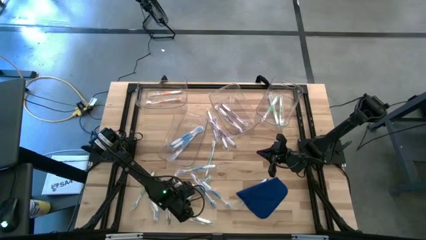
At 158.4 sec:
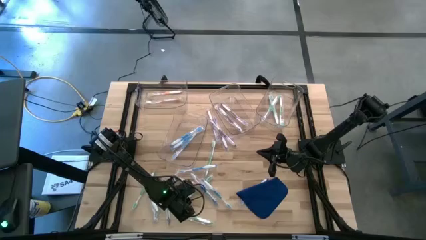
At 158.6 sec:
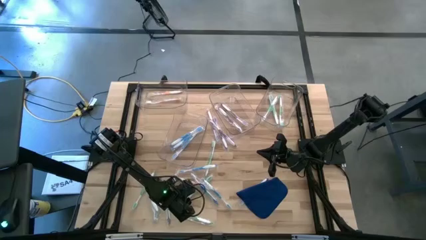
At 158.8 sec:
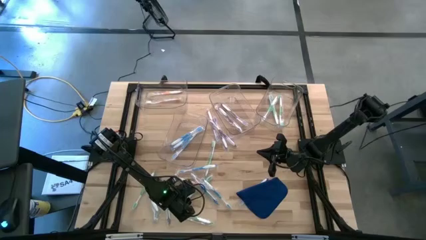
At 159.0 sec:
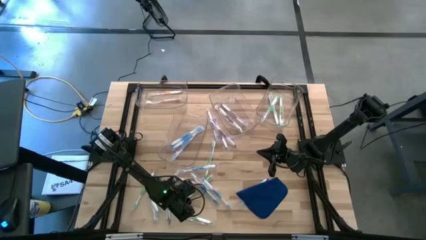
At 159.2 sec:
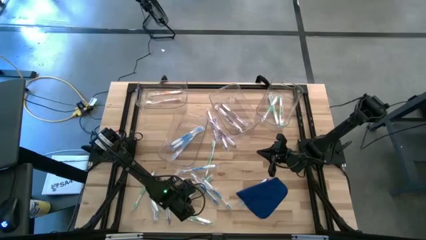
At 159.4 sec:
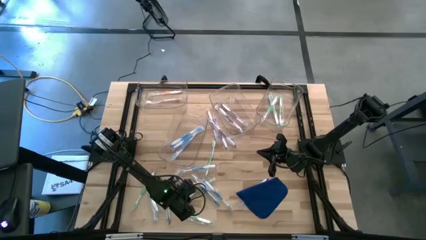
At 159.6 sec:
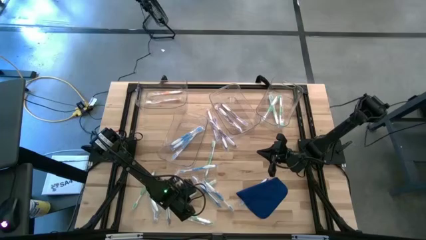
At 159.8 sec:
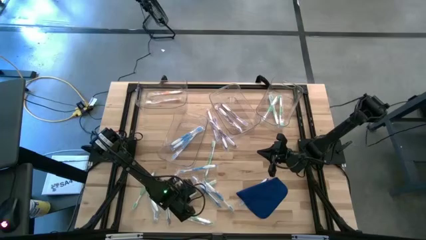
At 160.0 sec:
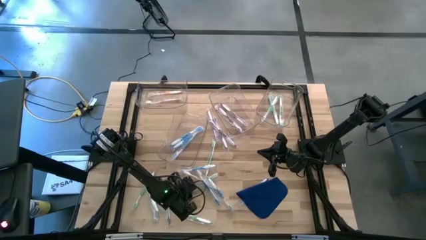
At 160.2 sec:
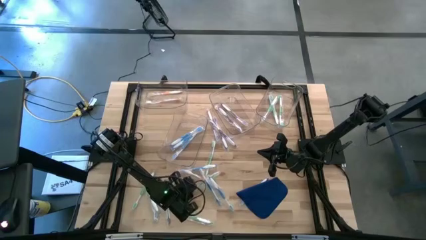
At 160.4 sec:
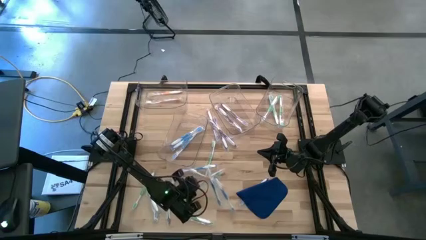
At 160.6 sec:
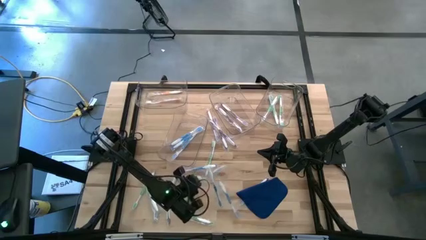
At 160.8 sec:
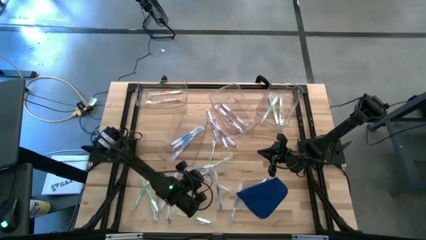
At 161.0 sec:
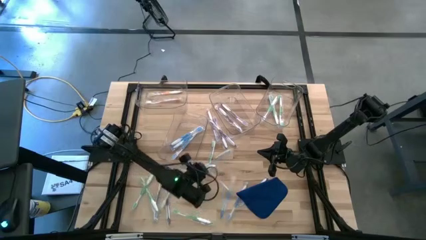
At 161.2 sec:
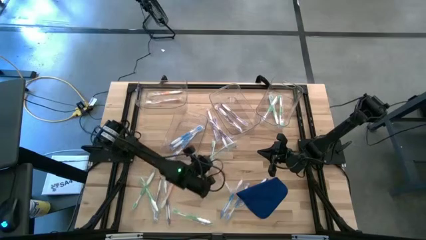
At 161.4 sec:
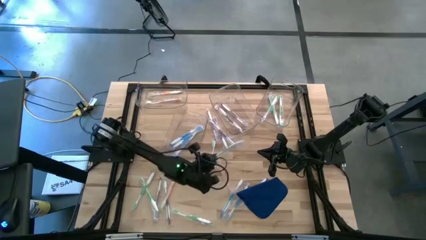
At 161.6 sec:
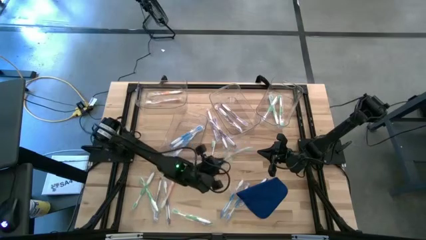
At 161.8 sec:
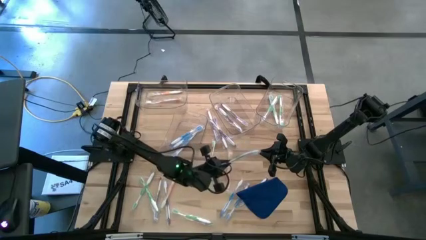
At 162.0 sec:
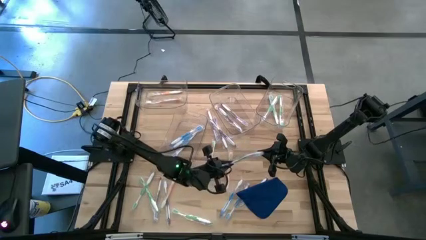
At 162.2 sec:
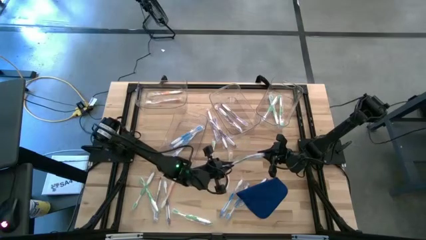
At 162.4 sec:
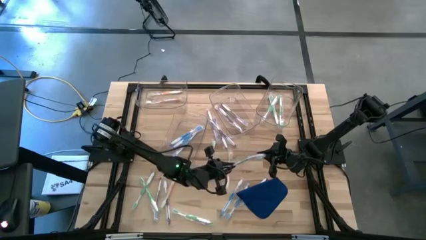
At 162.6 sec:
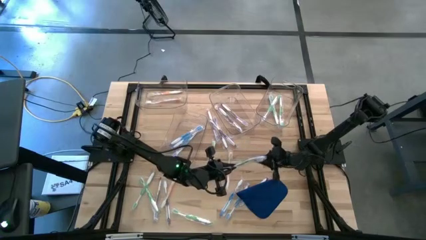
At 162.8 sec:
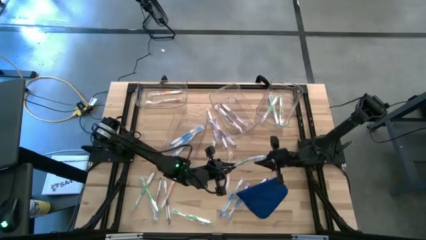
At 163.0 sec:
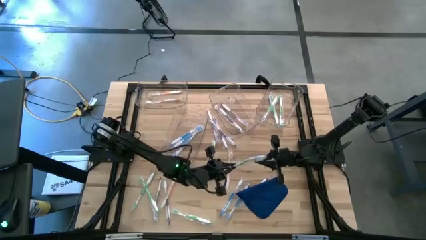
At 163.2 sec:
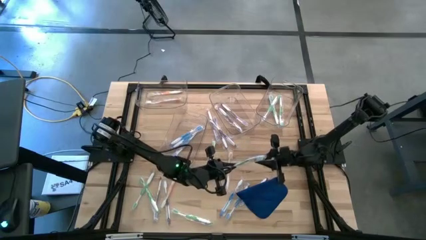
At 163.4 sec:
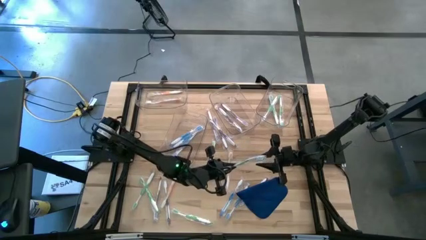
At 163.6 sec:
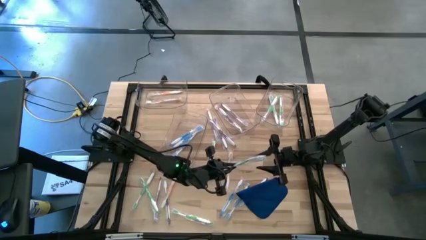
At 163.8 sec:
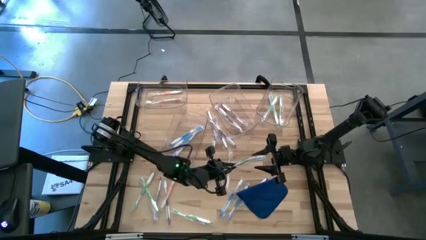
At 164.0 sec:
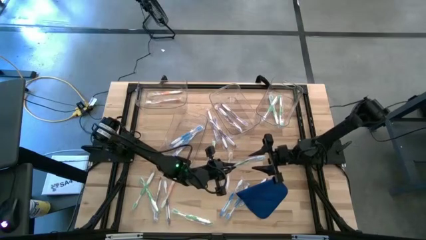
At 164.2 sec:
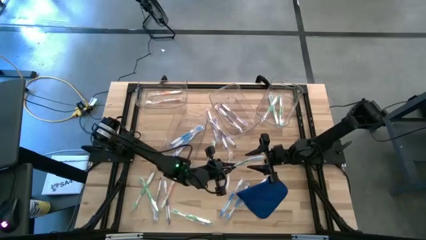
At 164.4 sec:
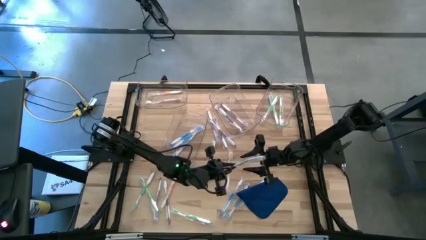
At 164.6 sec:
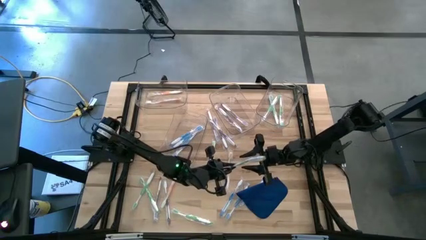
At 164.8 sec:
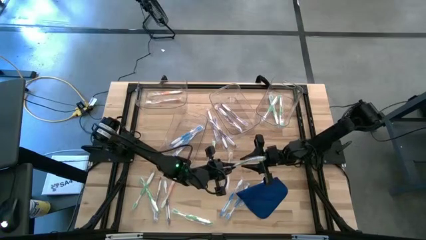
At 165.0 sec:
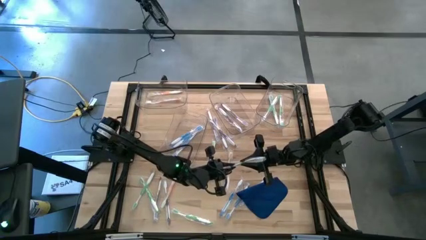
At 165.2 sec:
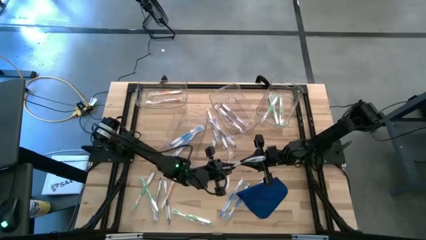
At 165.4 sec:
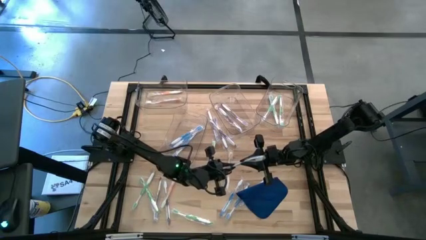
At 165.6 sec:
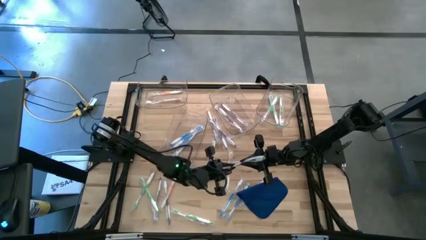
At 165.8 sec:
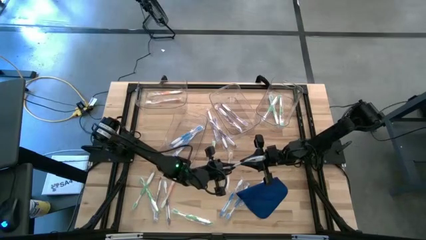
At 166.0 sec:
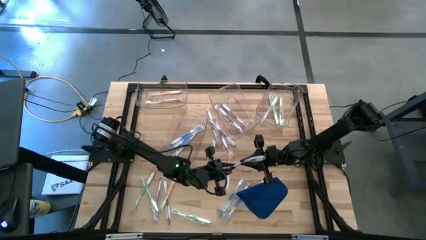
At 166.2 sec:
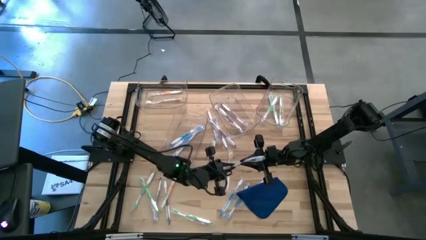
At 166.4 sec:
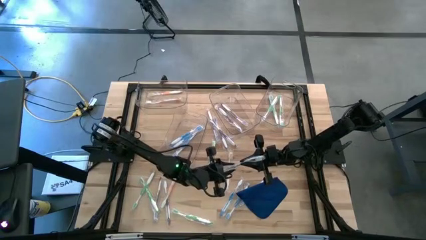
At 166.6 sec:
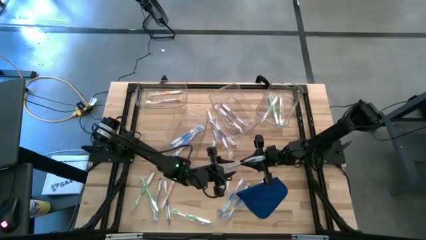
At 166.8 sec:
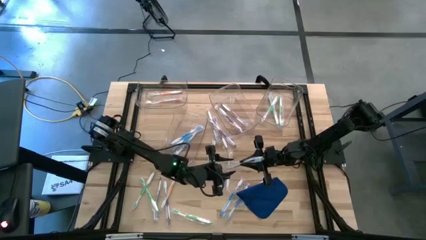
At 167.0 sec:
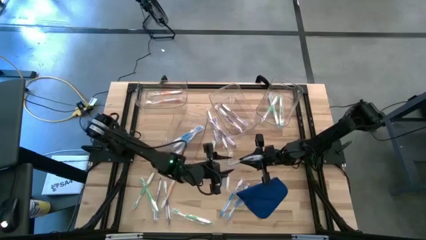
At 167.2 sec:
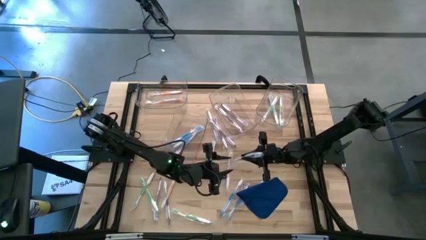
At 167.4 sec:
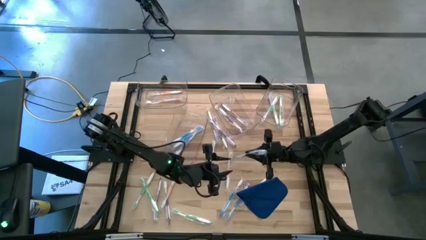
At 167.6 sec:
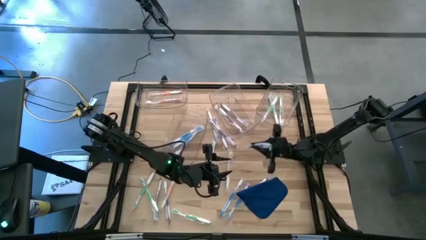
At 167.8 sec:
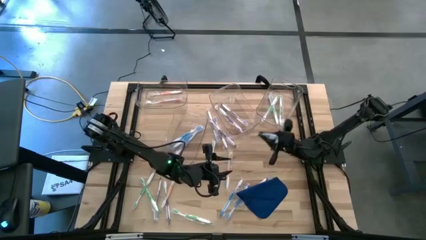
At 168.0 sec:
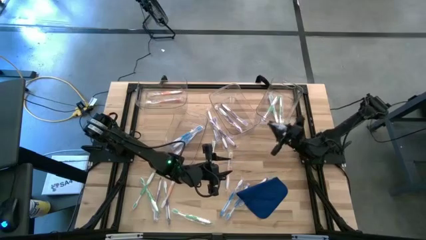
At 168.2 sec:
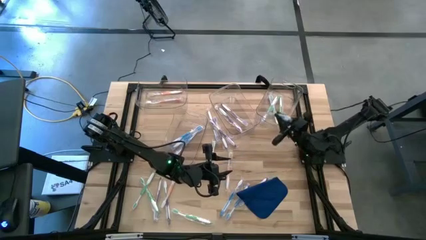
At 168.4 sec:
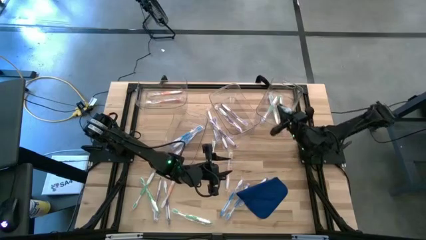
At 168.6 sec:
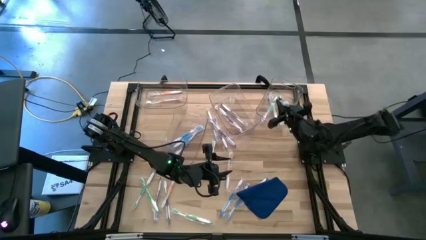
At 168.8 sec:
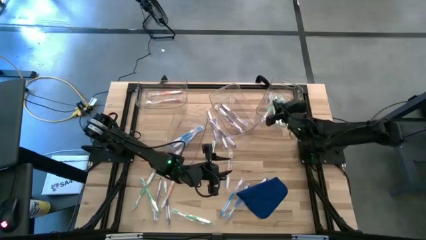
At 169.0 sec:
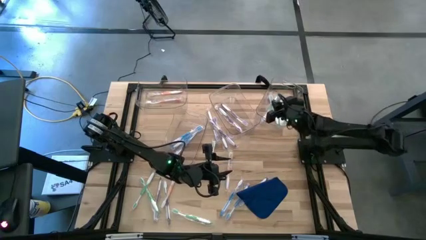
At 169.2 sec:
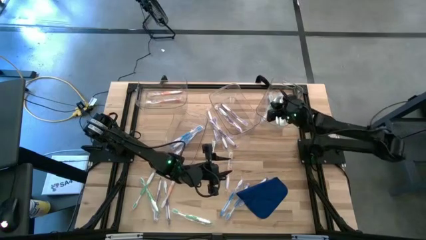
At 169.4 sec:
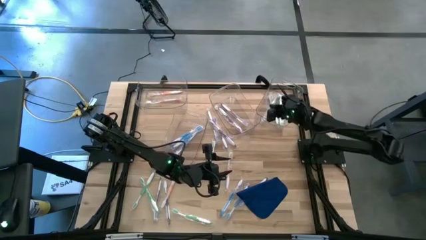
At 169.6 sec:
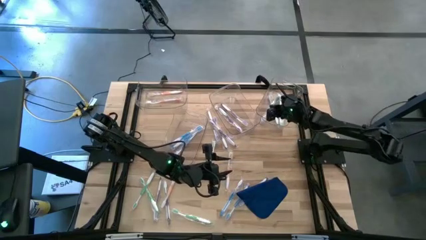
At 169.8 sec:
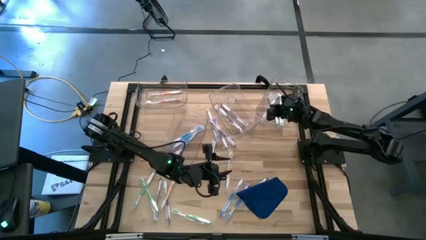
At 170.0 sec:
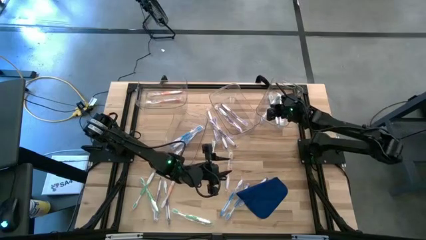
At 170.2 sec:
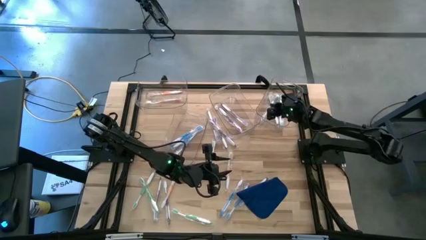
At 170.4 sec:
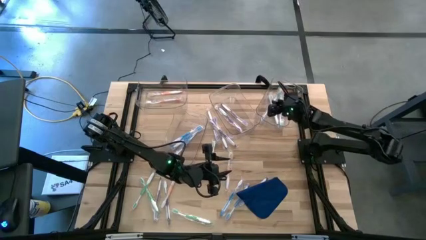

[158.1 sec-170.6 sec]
Task: Pick & Place Toothbrushes
Put the green toothbrush into the top right transparent bin
